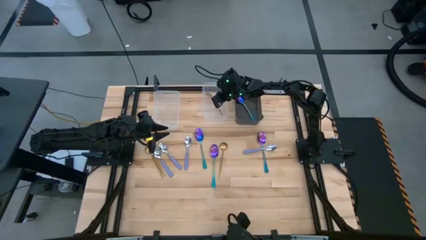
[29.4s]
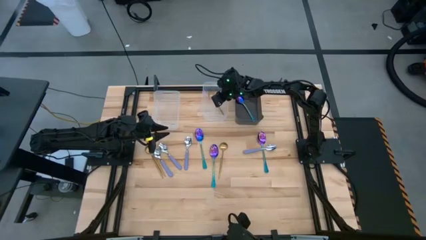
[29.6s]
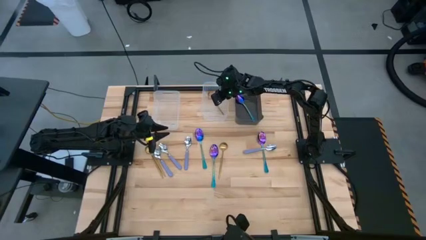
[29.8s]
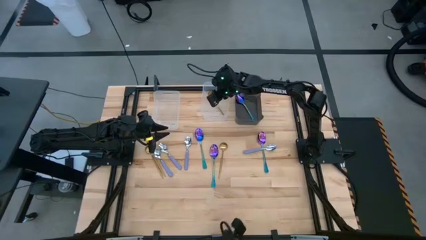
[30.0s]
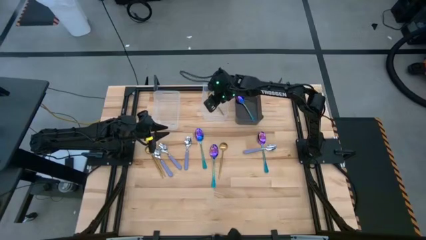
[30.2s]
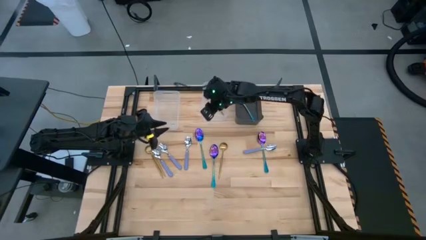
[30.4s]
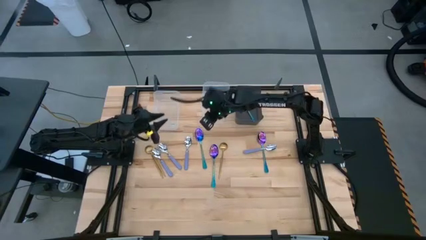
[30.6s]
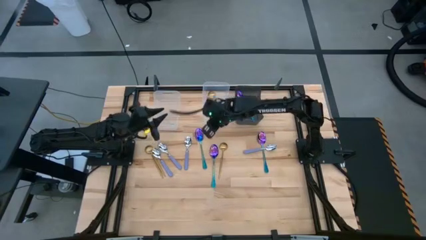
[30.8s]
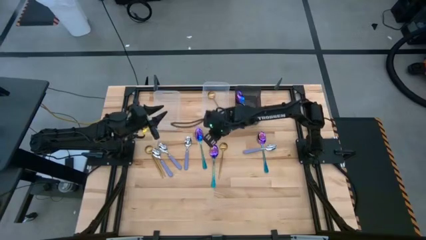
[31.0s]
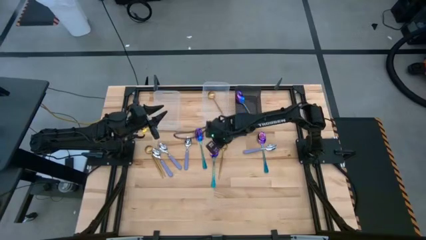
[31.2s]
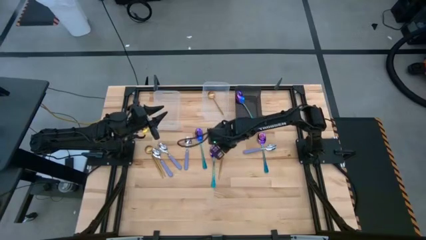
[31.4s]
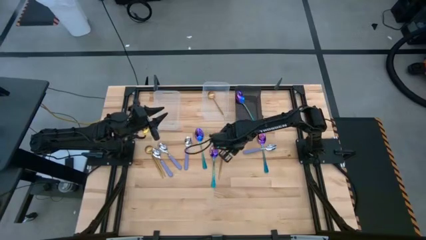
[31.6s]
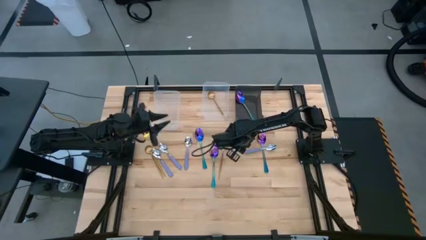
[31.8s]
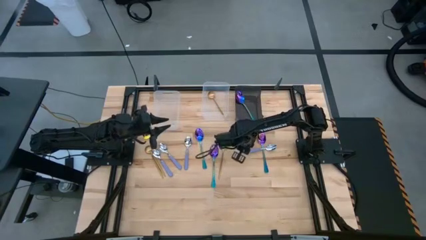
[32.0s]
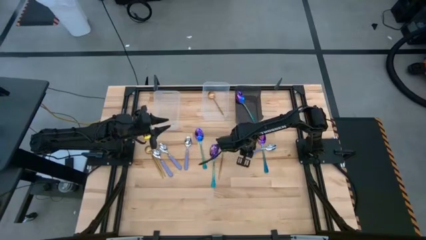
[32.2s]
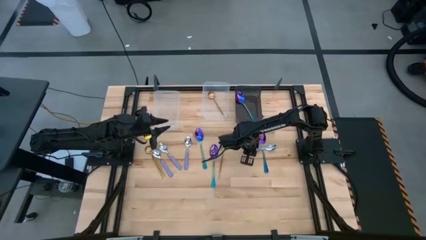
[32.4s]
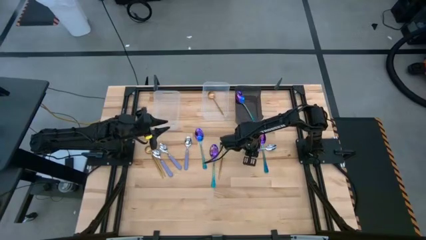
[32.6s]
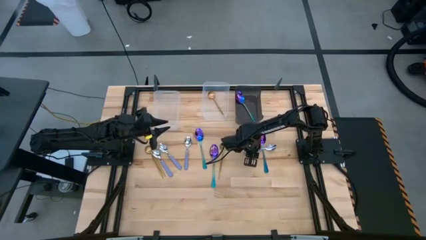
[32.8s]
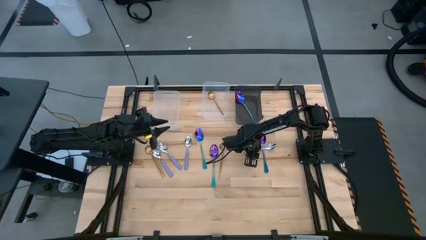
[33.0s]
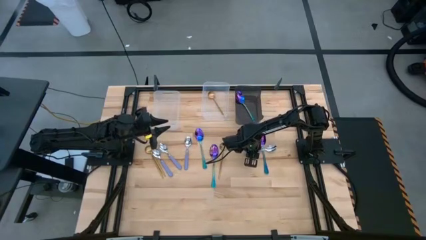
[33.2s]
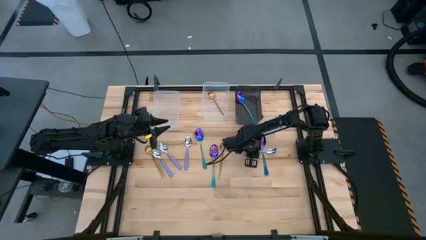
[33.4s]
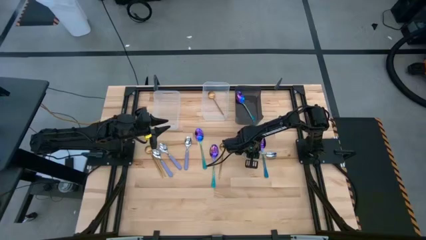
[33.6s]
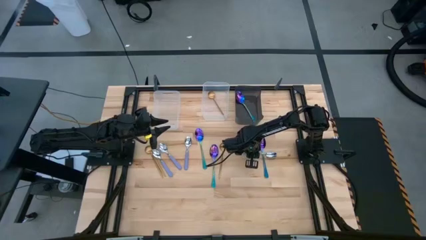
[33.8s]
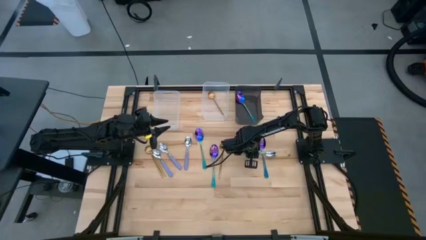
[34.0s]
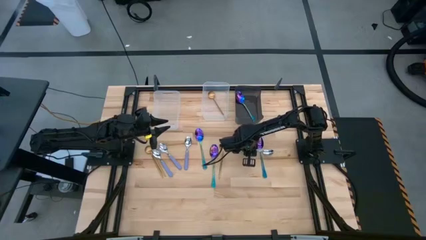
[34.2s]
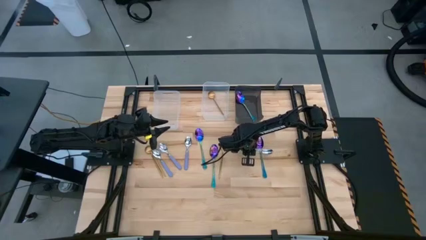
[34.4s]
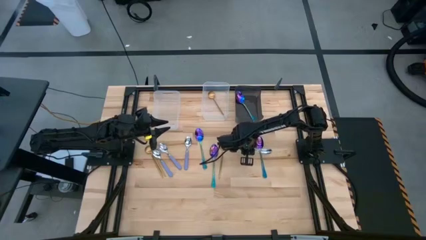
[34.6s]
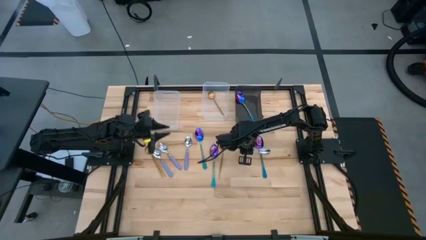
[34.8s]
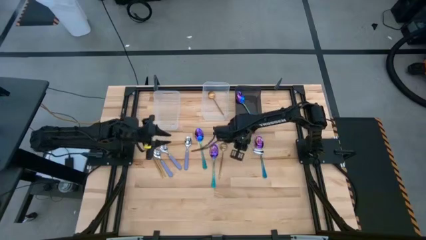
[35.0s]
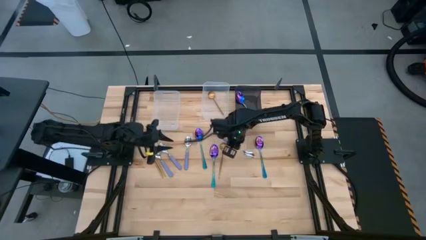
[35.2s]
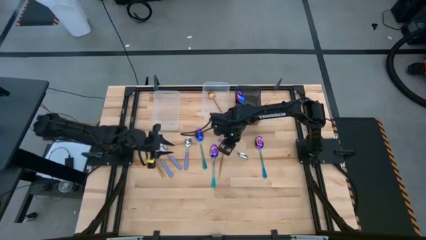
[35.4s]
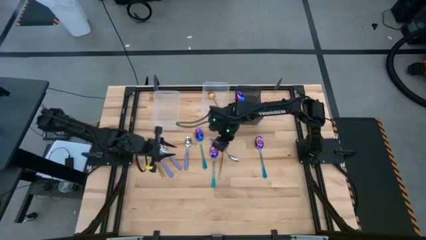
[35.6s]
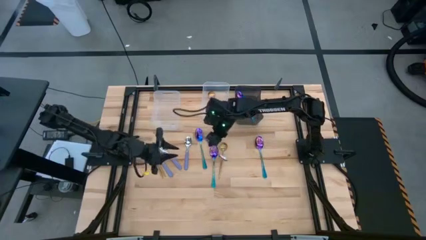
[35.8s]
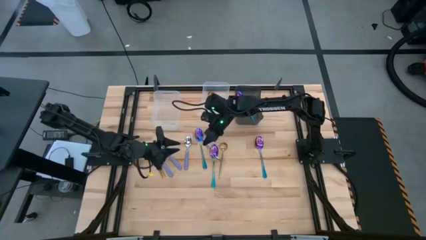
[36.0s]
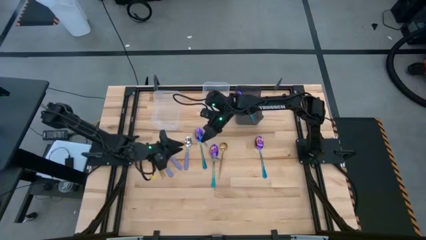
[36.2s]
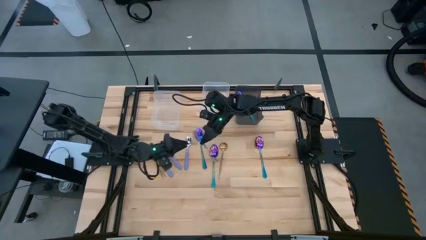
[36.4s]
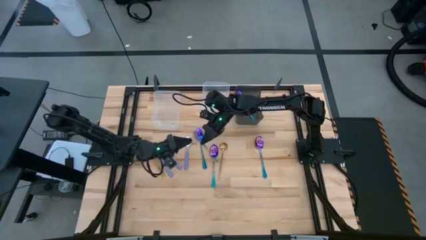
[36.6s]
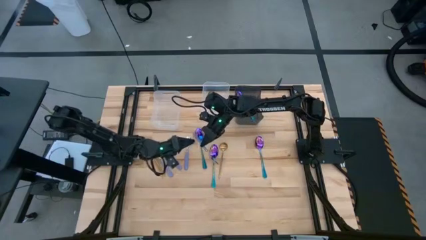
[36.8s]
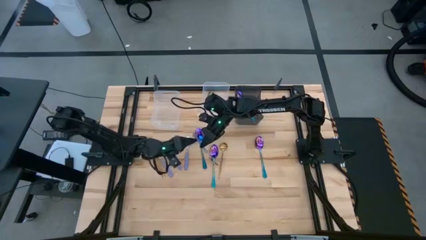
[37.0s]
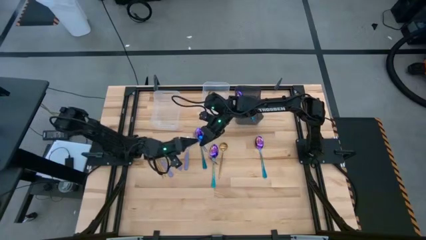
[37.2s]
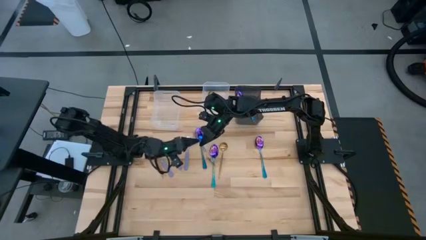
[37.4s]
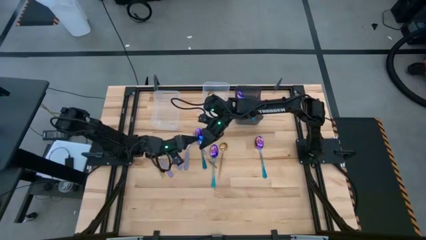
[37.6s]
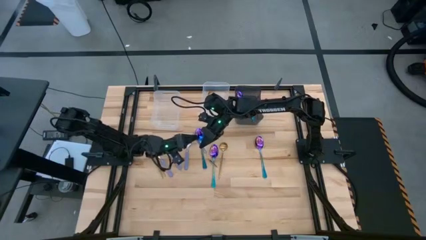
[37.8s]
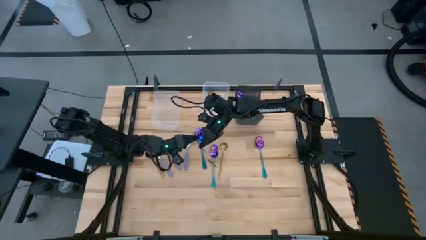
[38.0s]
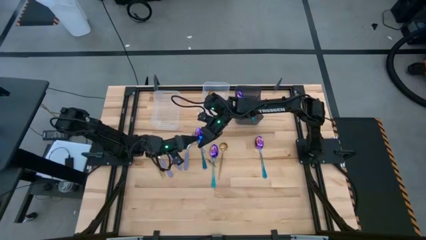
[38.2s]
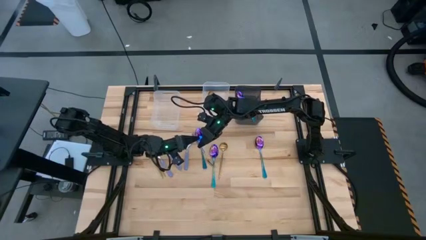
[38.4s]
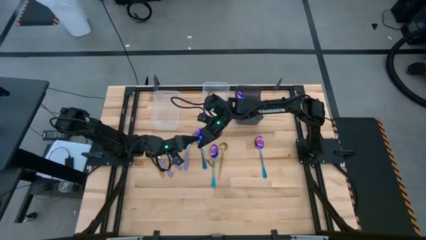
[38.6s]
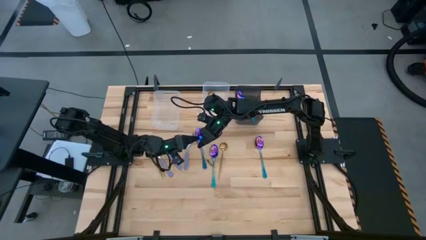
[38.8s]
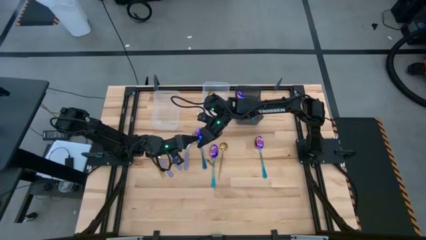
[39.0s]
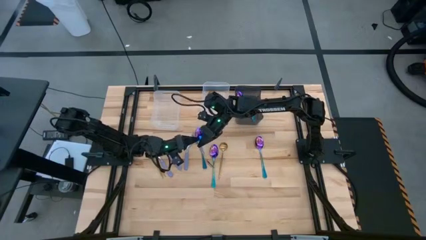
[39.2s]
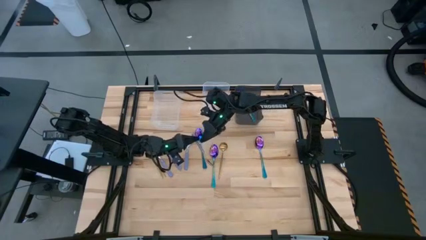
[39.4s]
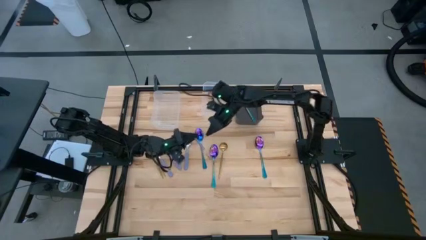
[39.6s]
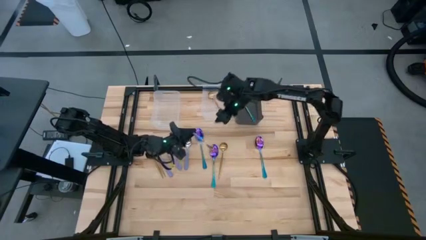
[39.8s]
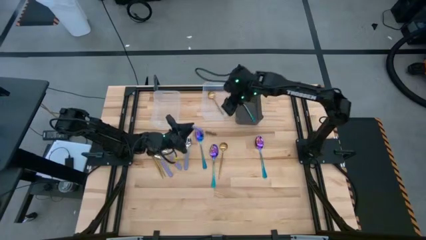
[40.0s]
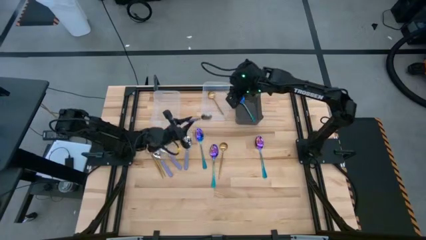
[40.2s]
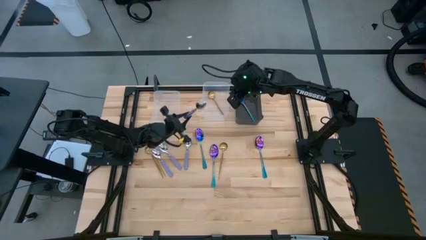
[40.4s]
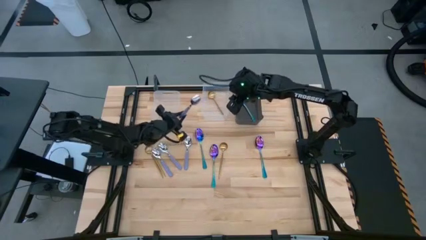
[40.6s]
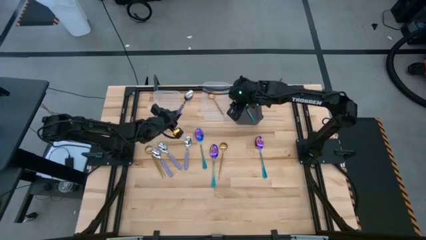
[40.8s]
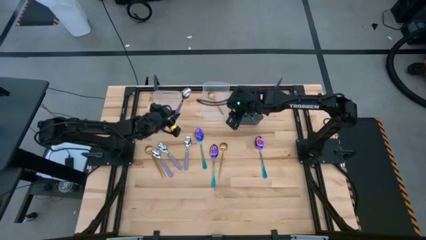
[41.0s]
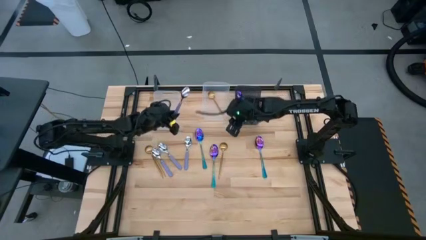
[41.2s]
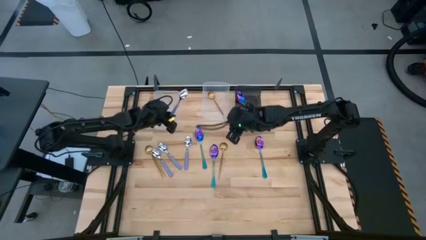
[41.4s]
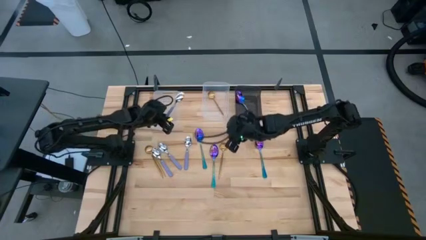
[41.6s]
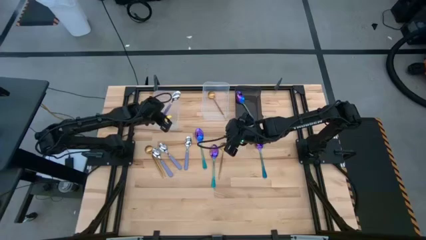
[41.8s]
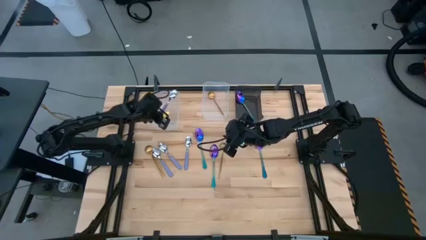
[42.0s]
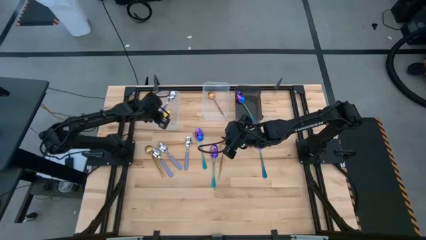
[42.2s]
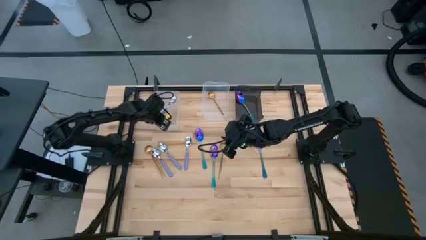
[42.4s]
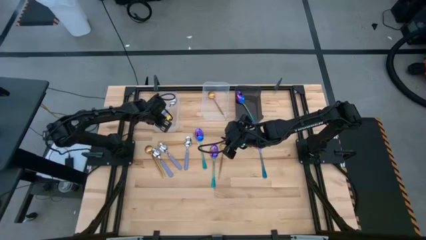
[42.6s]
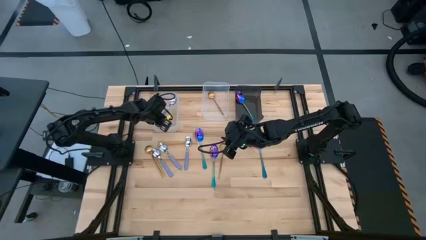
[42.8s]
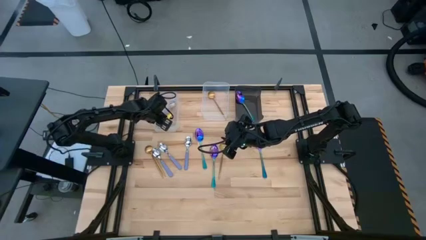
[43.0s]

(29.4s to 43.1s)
Task: Sort silverware by color (type)
Put the purple spoon into the left transparent bin
